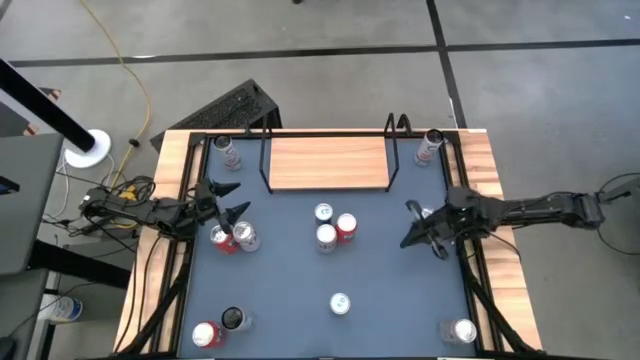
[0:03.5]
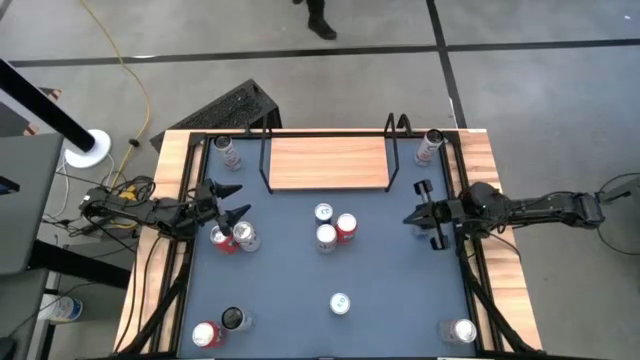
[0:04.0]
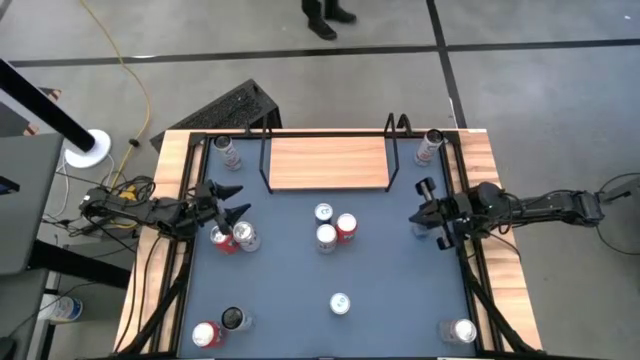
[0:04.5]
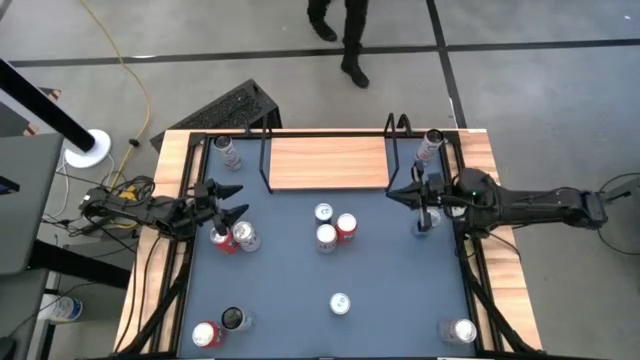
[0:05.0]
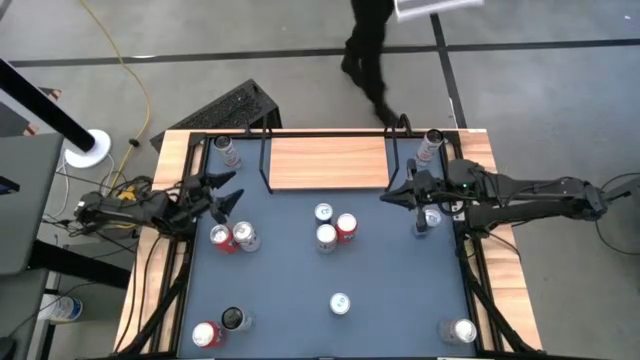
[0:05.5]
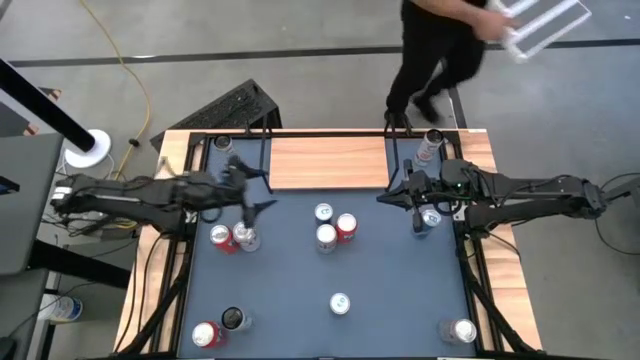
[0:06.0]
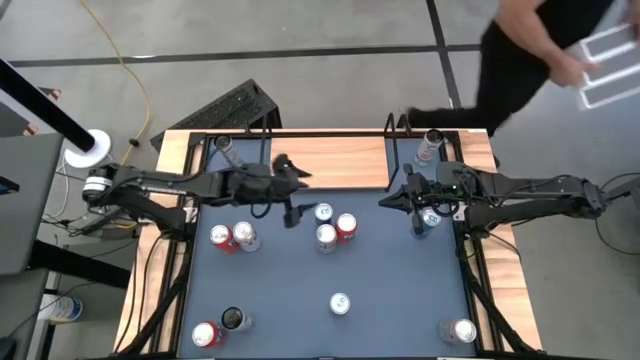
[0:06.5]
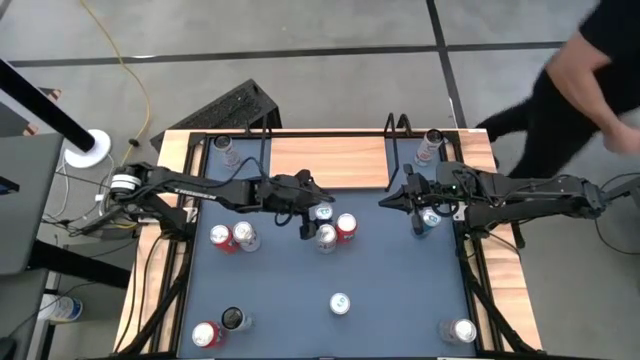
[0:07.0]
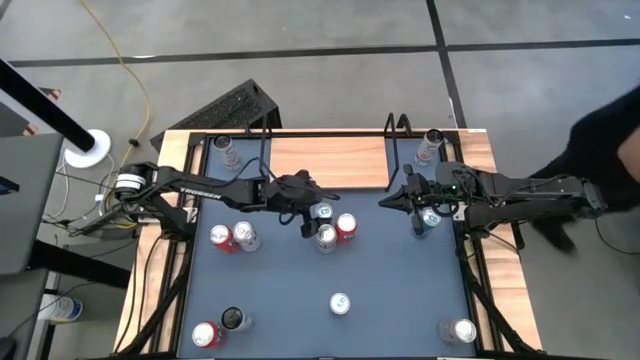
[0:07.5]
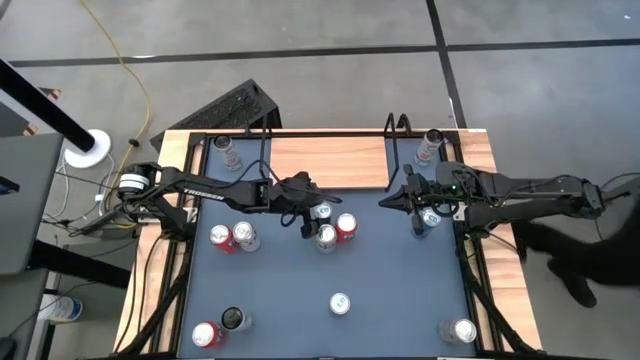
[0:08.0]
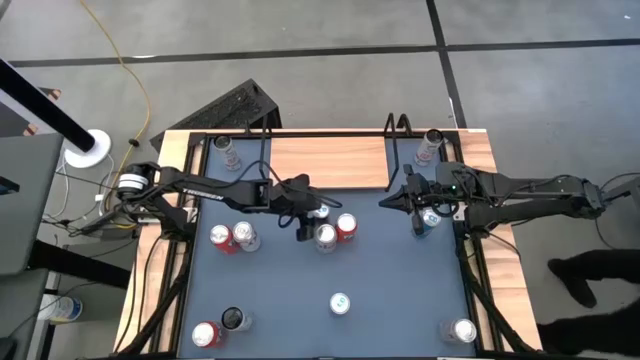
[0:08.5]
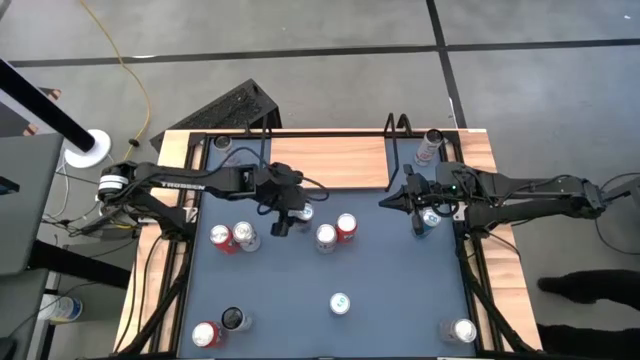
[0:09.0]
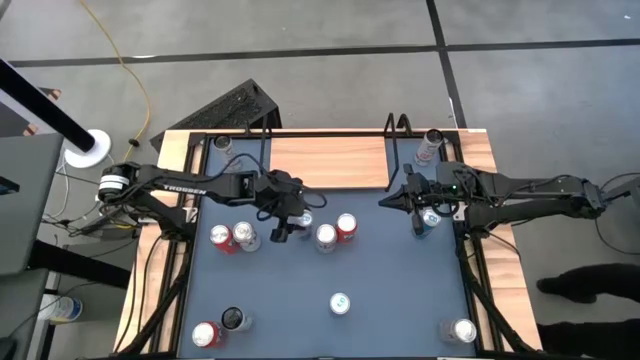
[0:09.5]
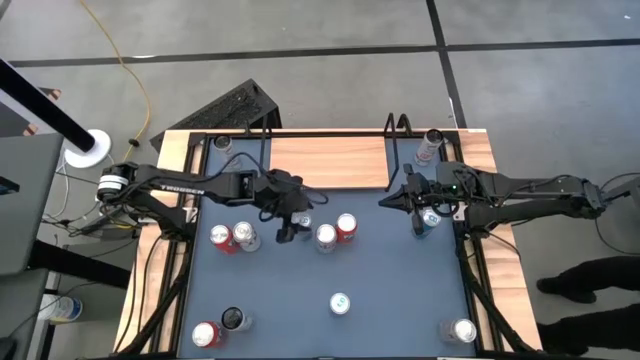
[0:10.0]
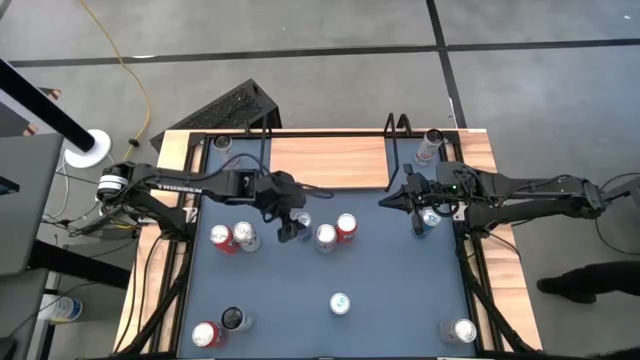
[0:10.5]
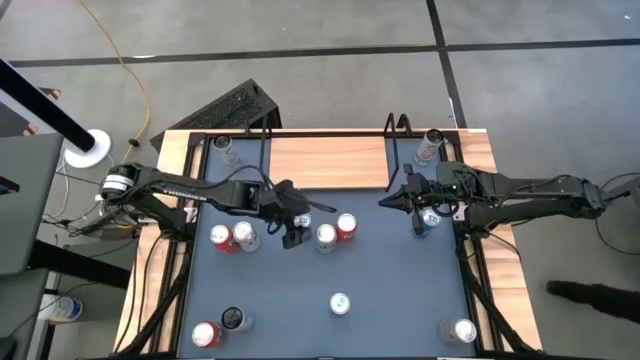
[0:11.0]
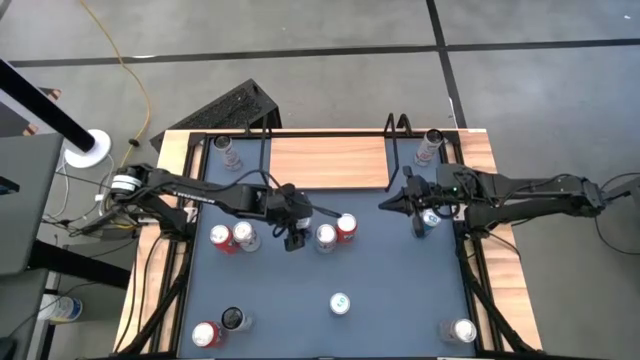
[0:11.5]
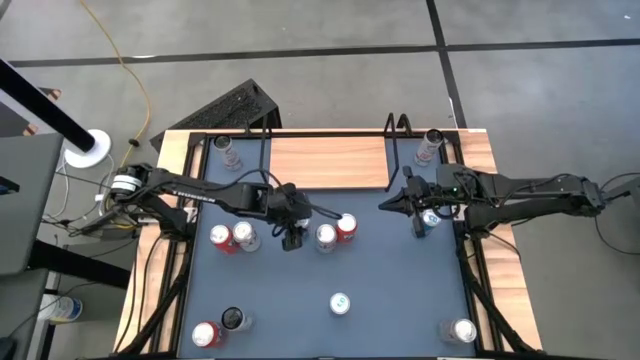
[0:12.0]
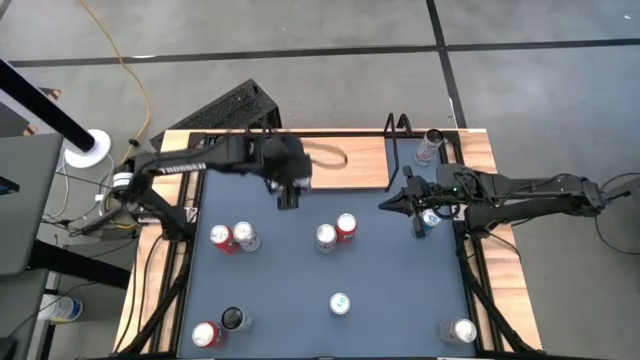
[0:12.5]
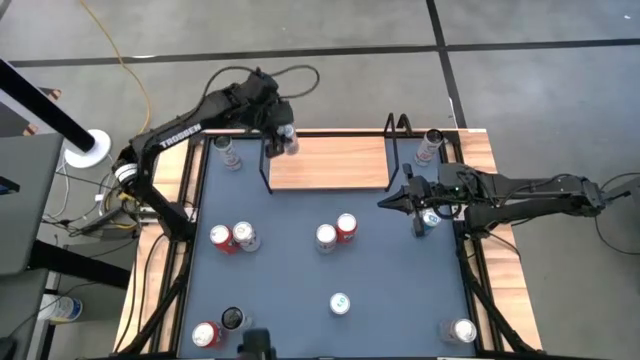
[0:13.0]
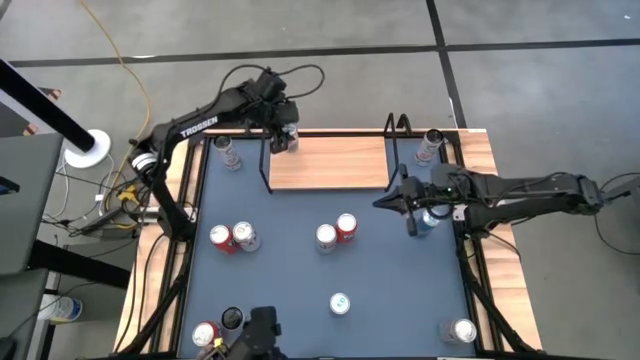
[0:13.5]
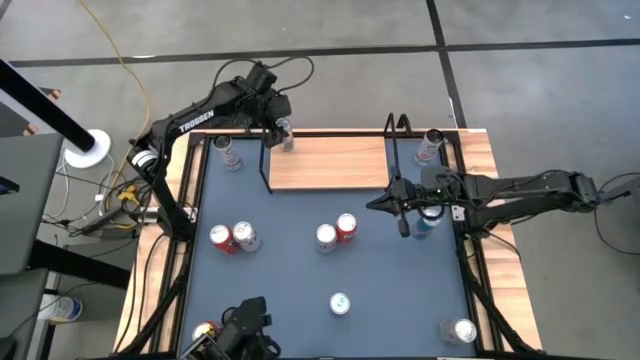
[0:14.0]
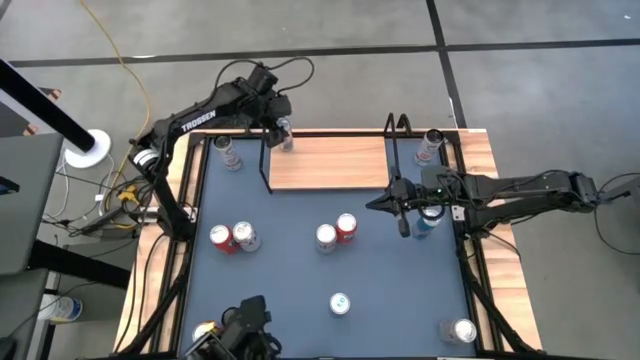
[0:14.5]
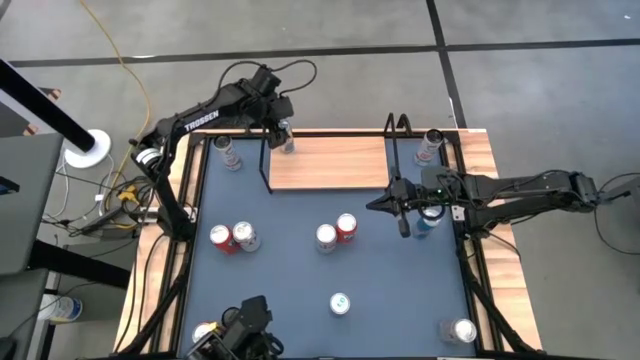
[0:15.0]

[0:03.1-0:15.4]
Task: Place canned beverage on shelf
Put the top left blue soda can on the shelf

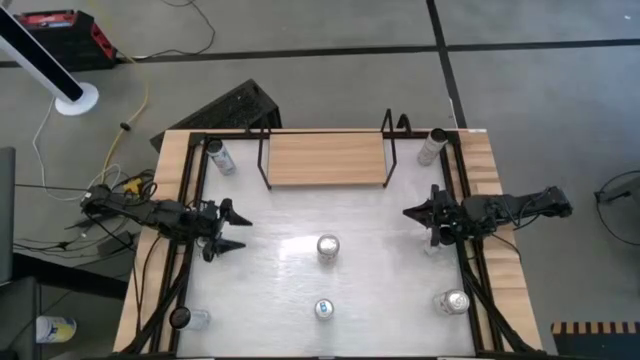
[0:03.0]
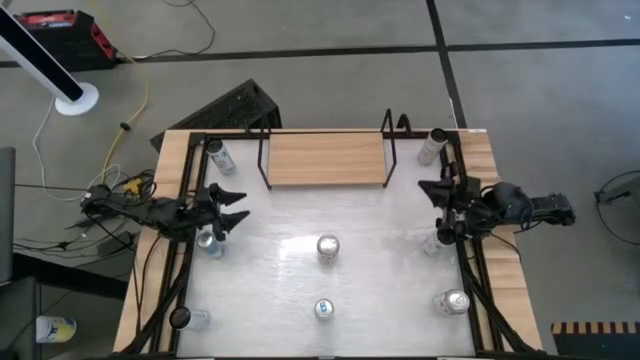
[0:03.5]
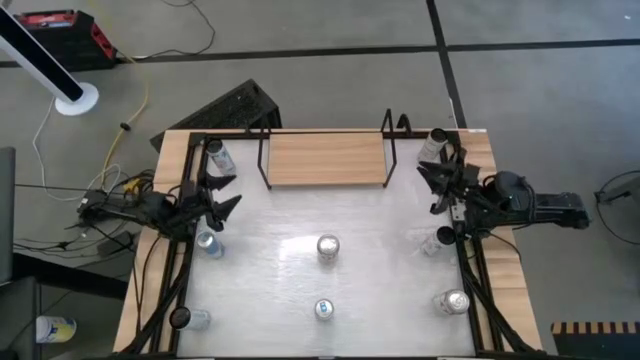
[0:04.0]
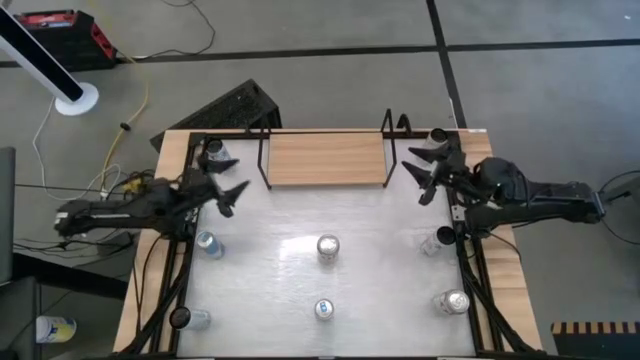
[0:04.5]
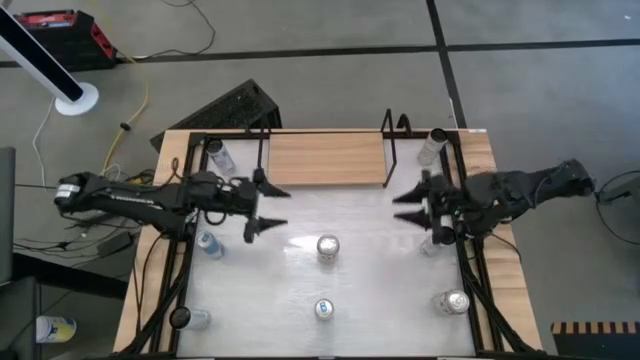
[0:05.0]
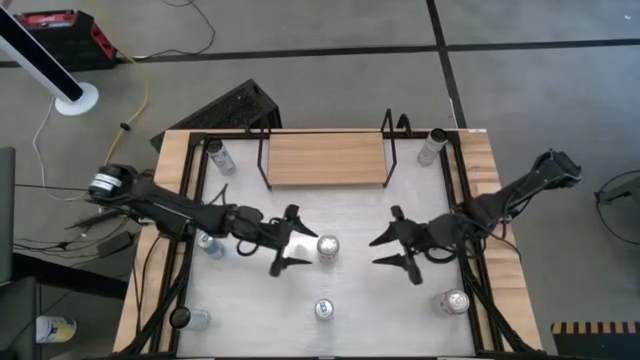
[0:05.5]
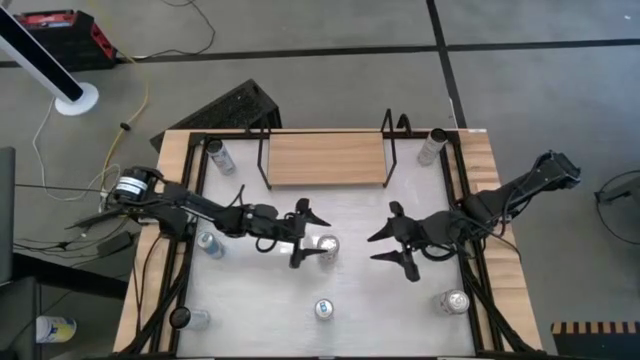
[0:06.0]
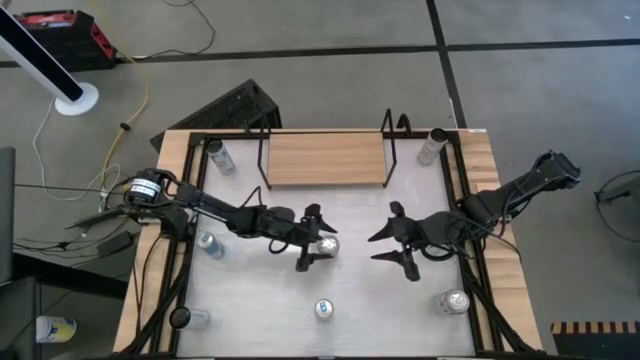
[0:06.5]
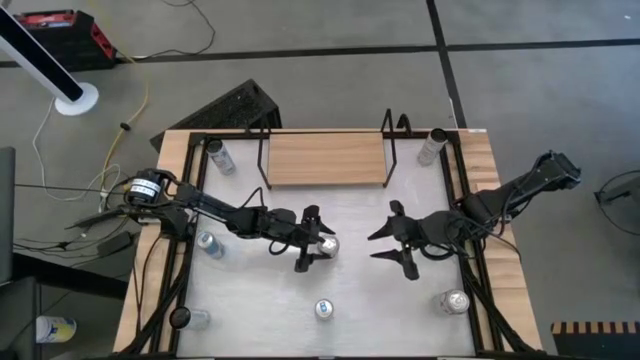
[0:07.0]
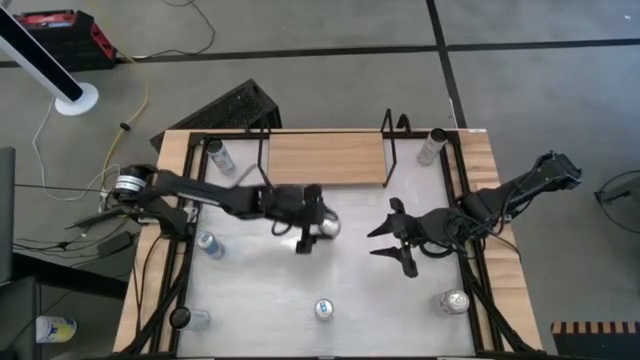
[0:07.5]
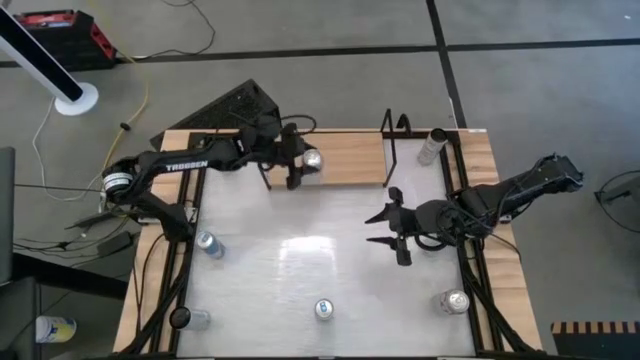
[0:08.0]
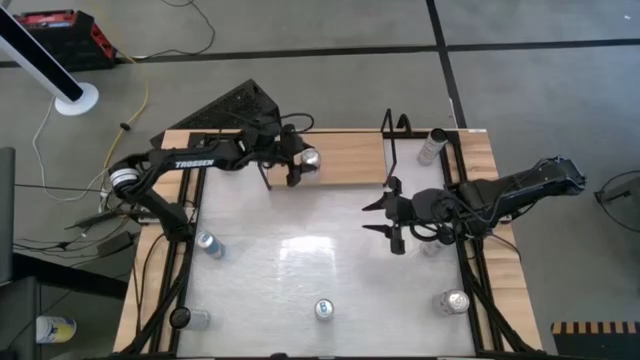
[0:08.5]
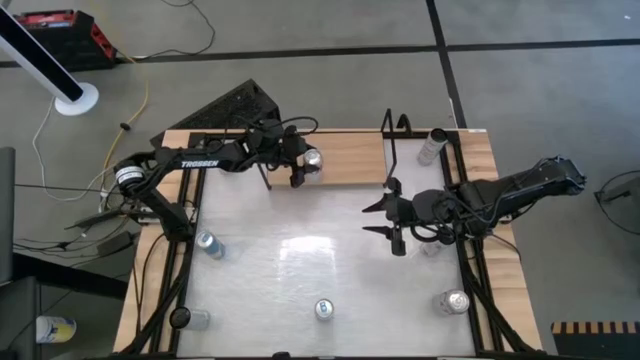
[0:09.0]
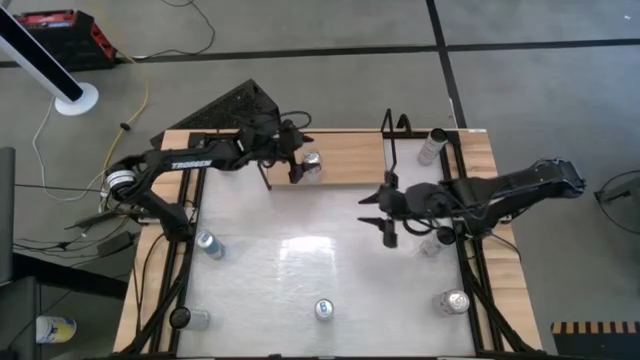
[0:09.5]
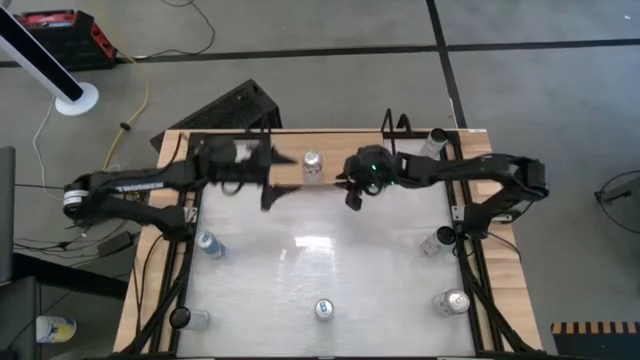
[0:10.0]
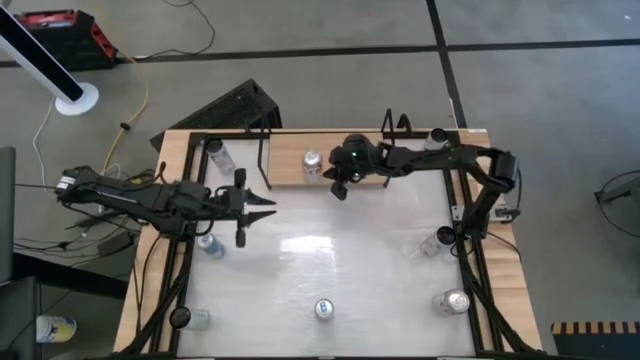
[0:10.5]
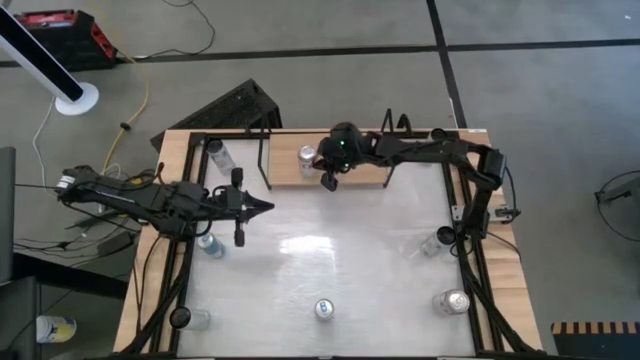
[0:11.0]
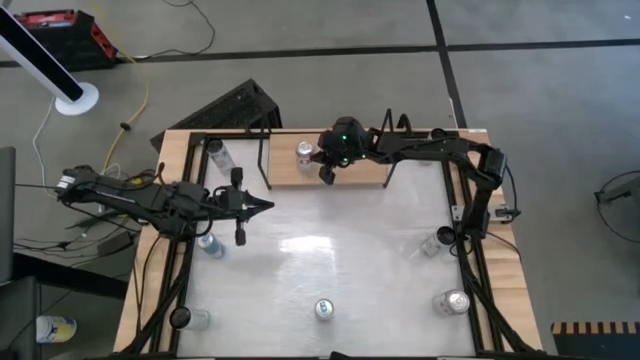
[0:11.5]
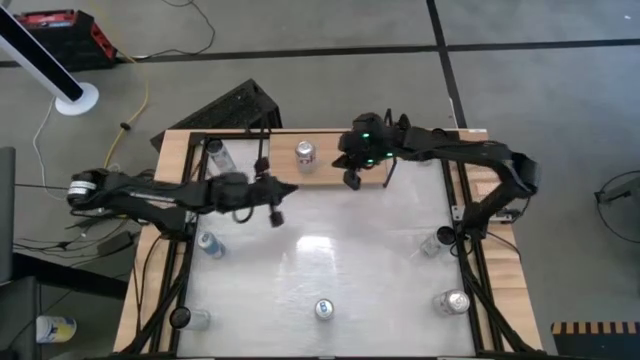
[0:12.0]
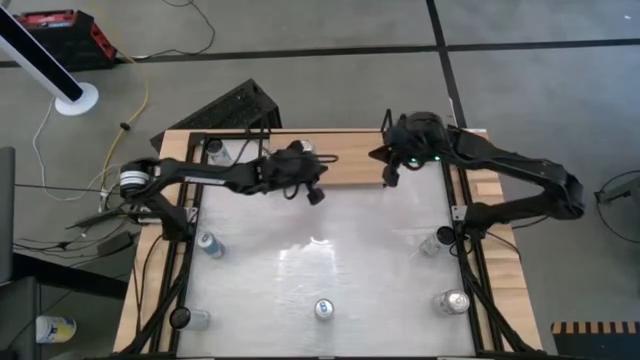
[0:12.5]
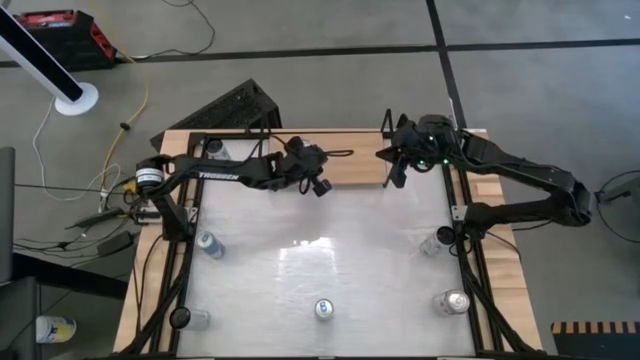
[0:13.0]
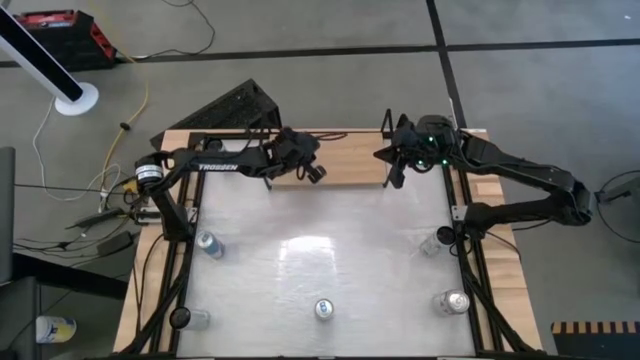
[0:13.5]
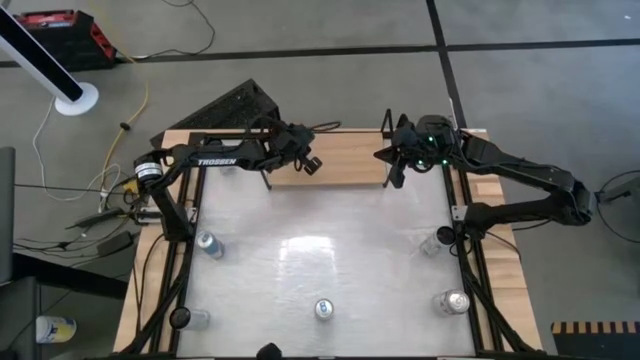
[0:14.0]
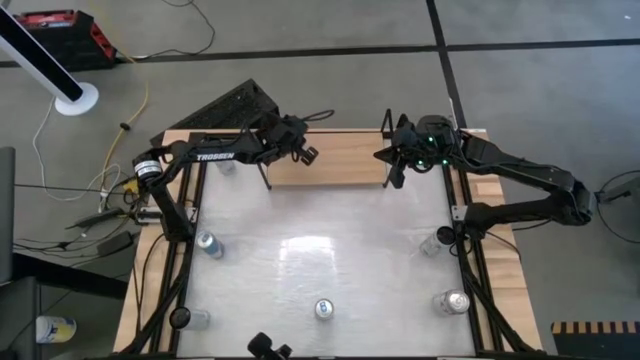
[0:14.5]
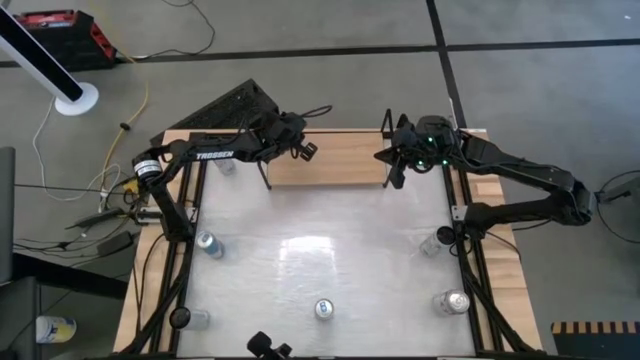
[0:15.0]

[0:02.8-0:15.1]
Task: Place canned beverage on shelf
Put the left silver soda can on the shelf
